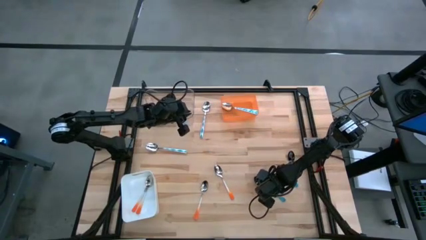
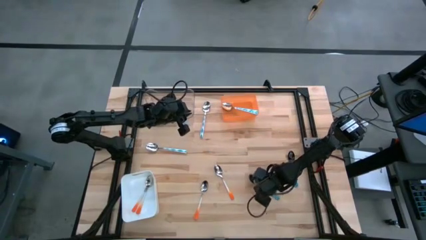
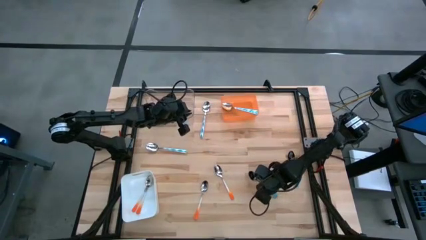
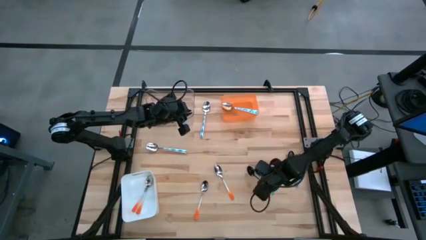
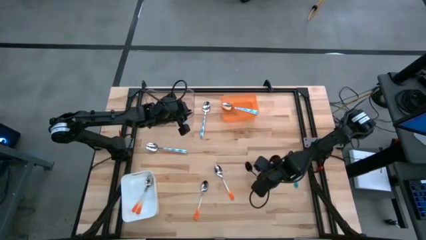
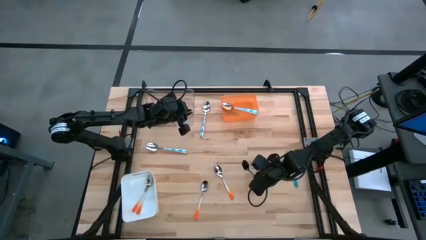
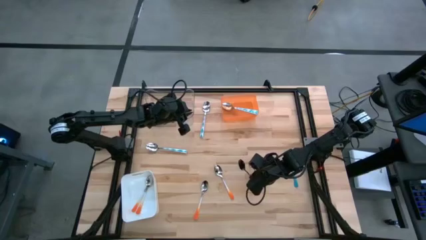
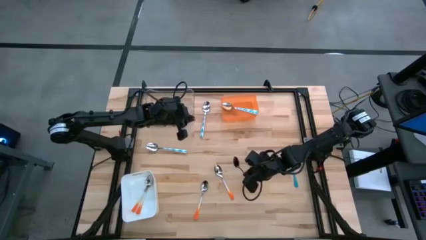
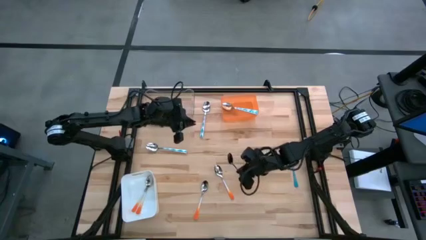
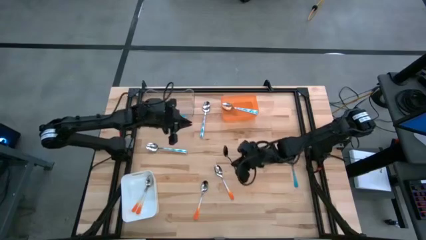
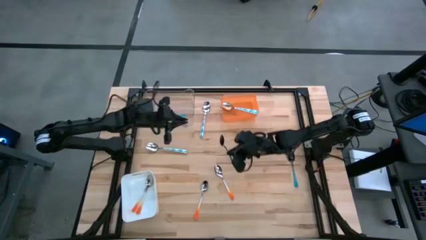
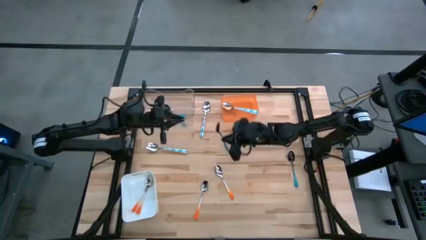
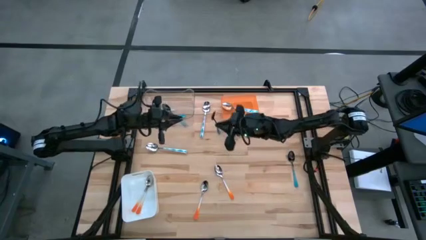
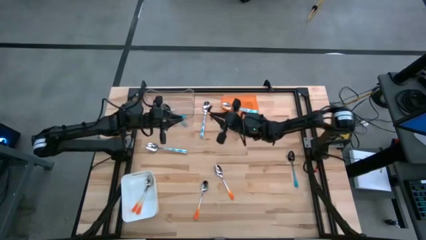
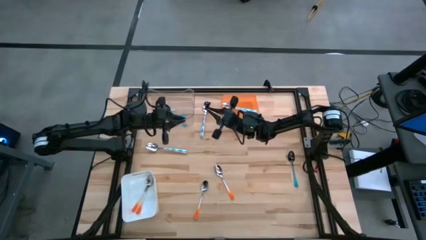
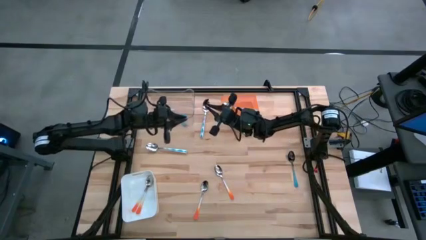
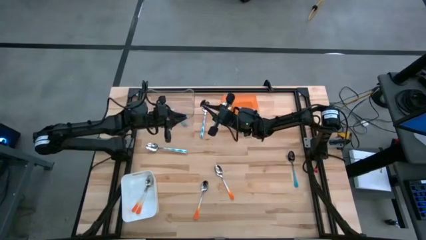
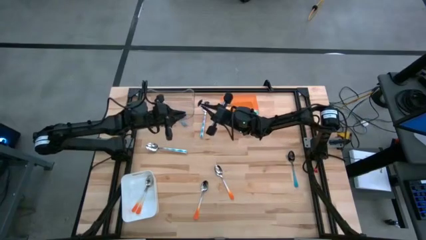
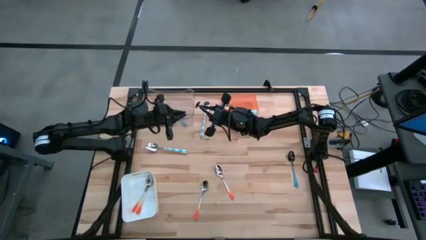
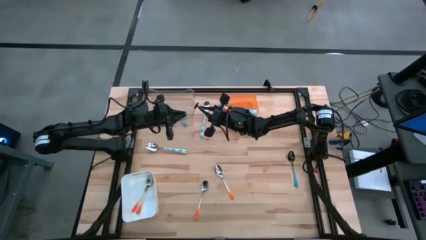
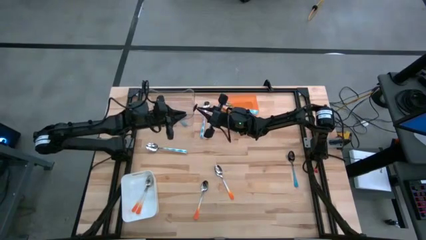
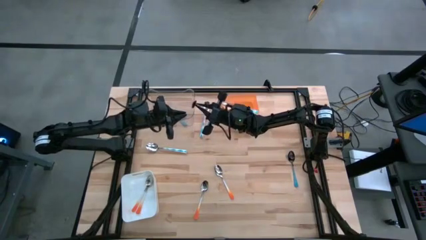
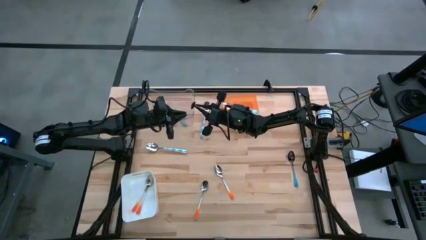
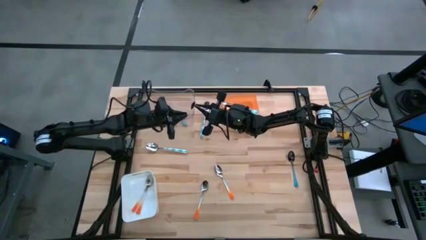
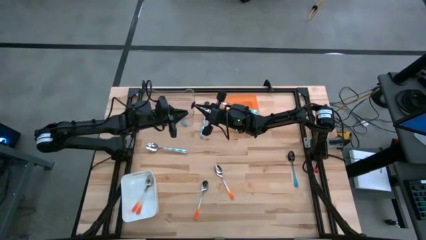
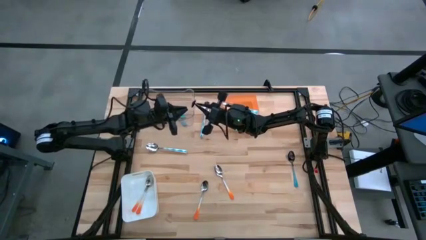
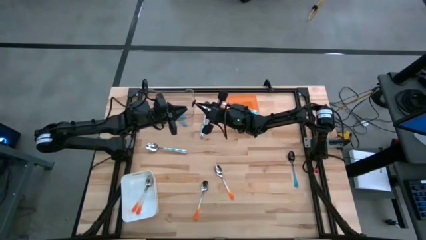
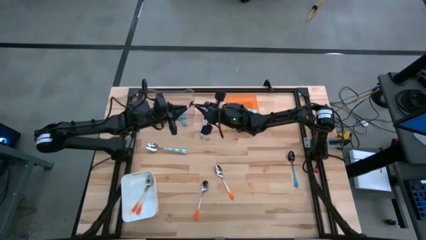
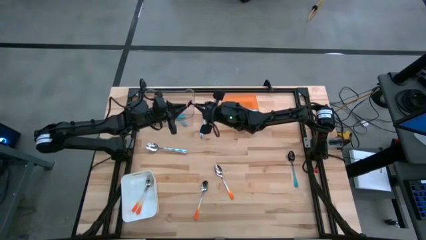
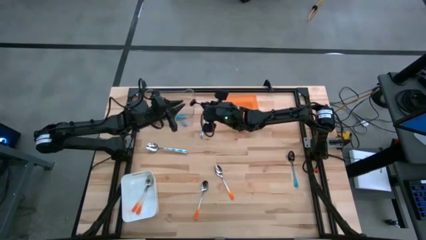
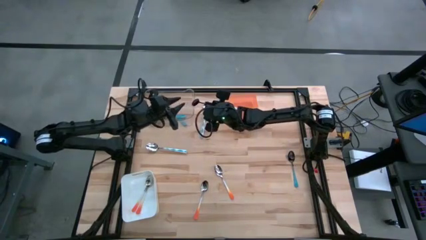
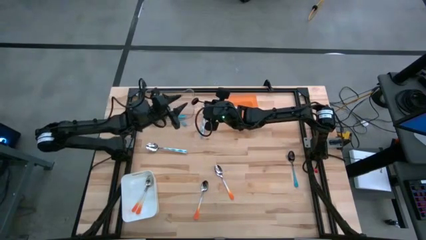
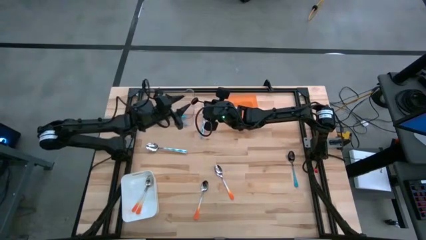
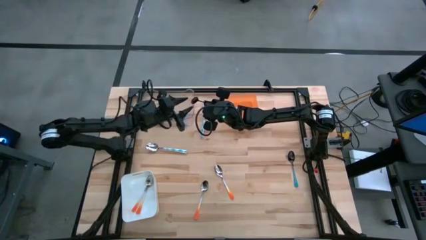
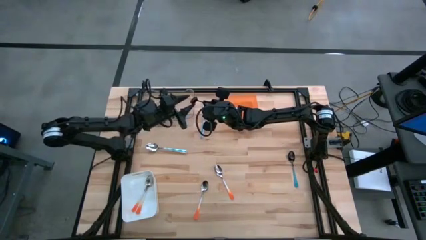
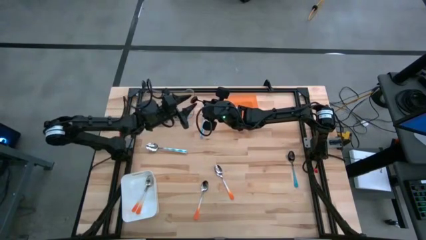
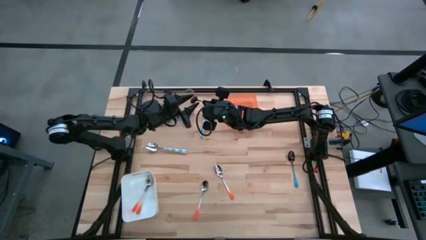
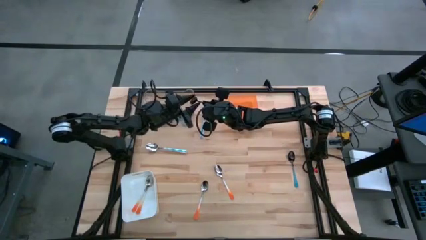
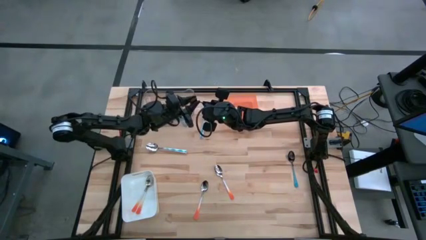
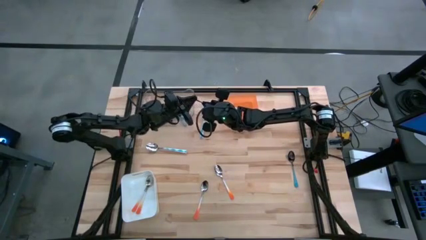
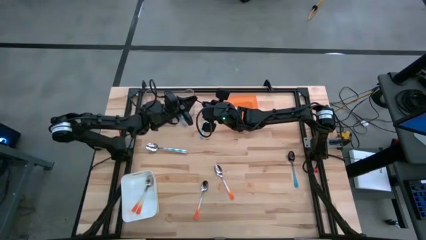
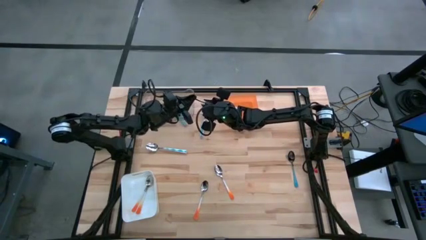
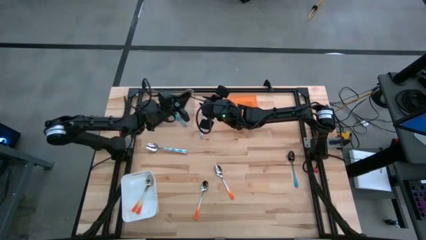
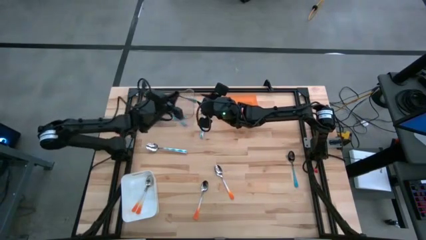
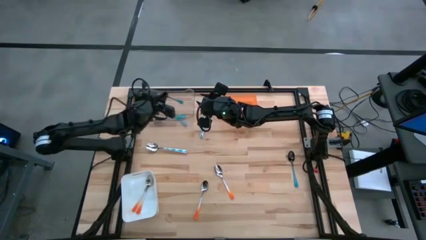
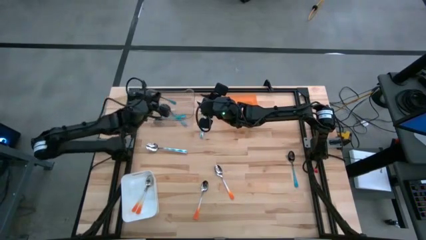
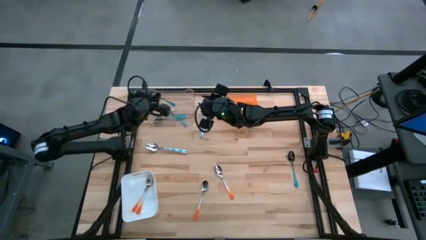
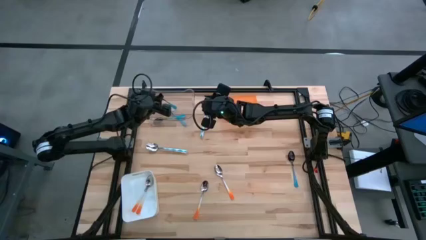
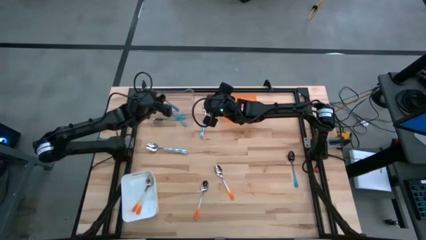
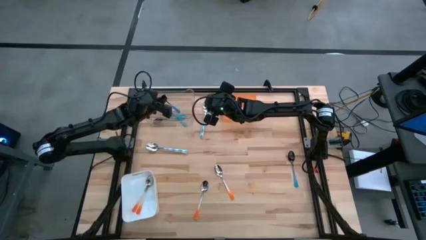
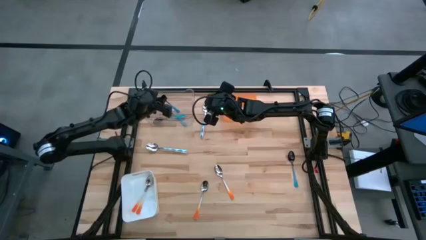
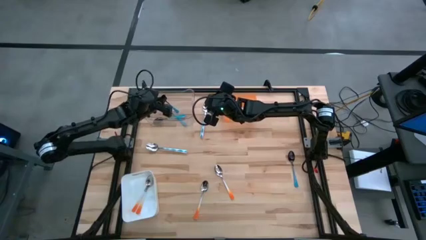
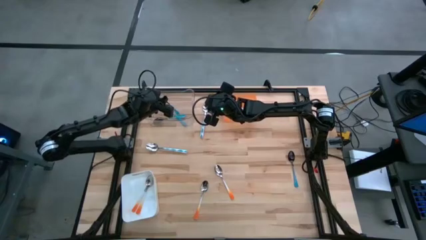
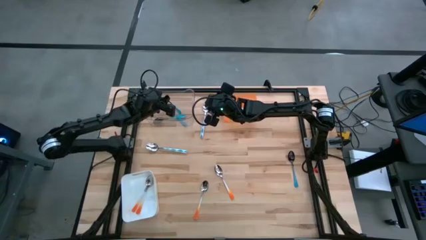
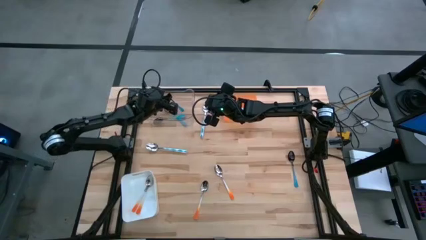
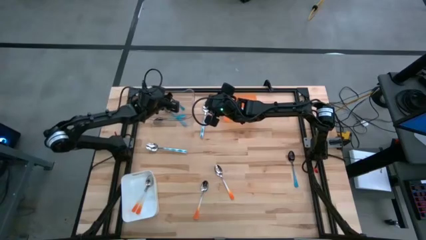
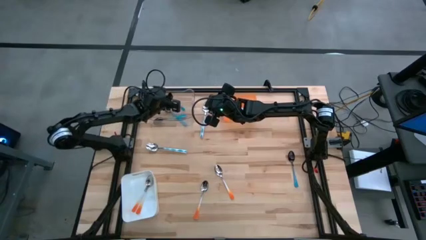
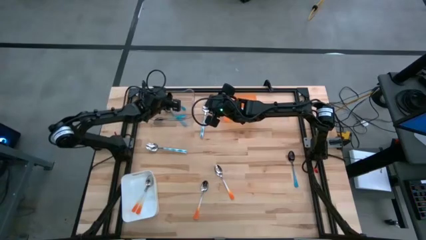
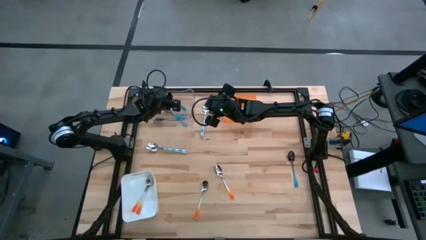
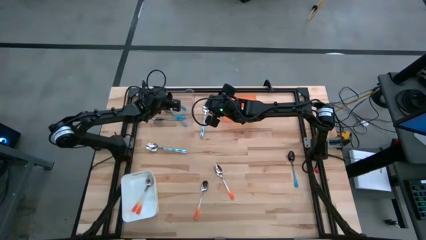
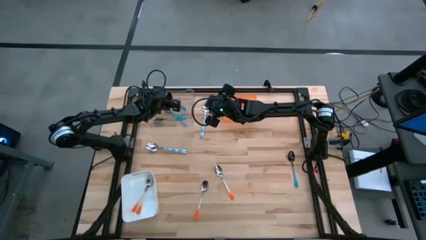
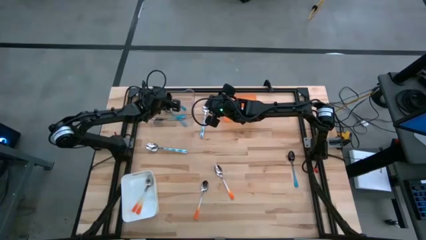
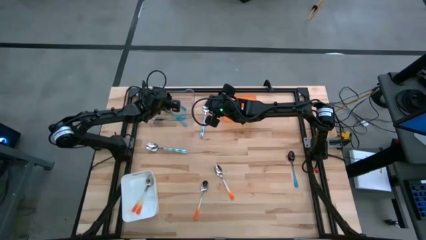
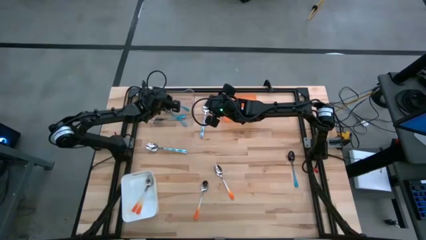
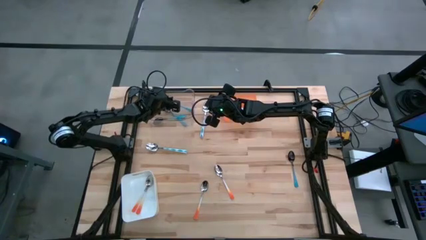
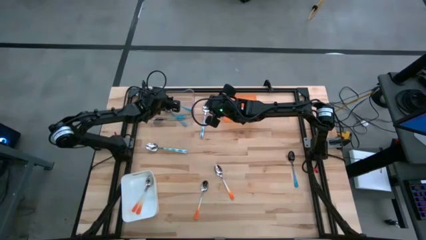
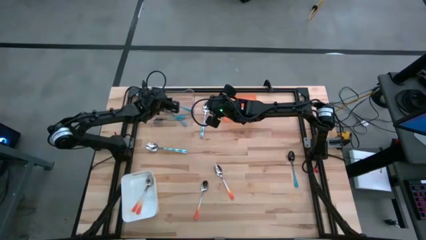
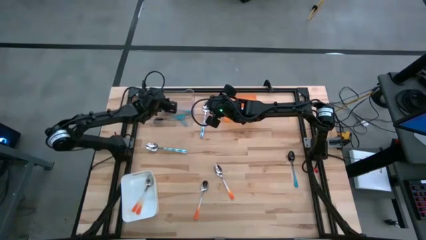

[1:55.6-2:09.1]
Task: Sort silverware by color (type)
Put the blue spoon into the transparent bin

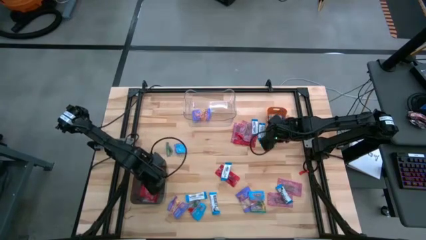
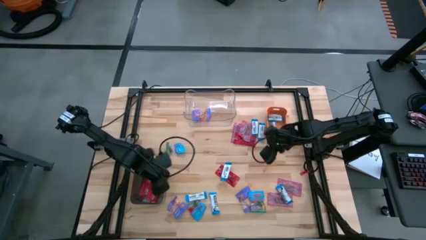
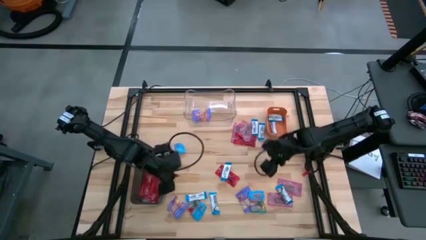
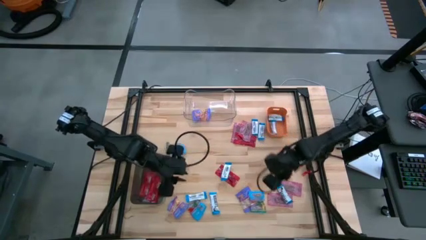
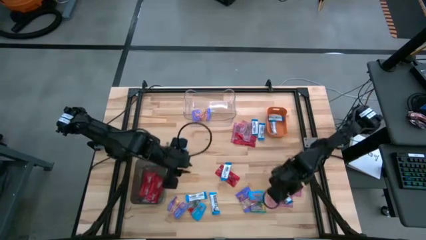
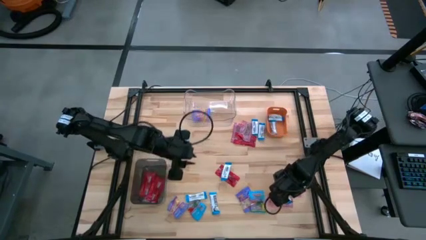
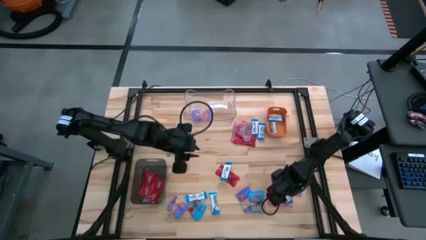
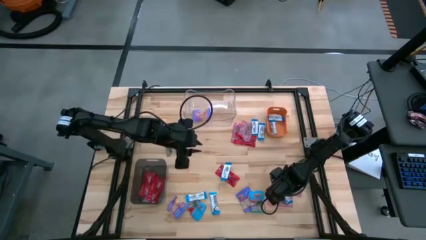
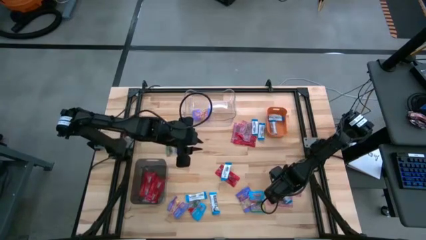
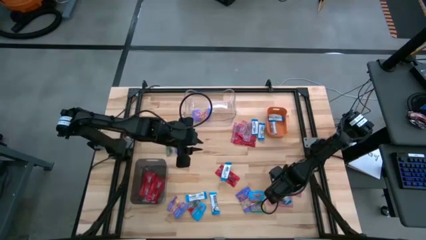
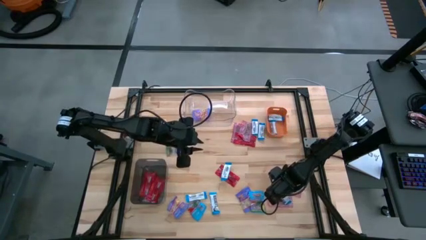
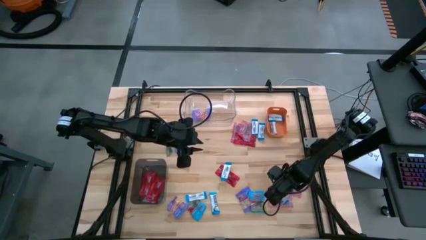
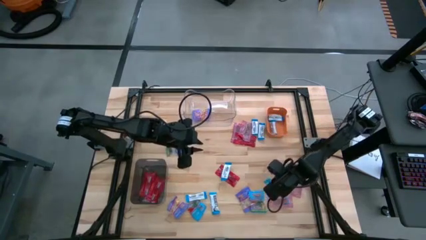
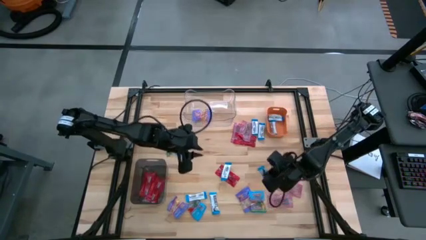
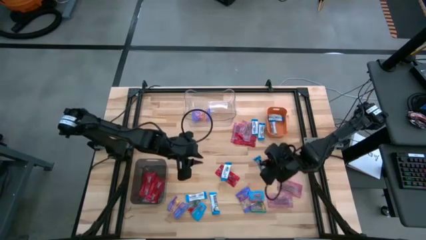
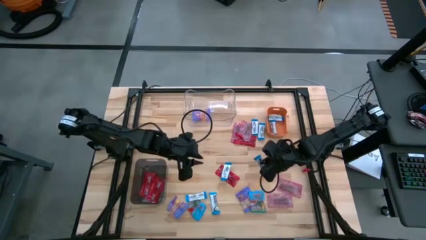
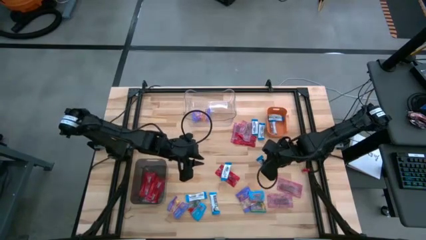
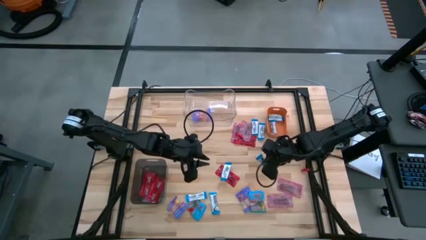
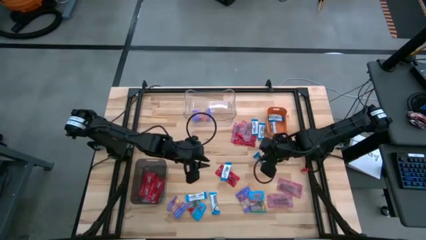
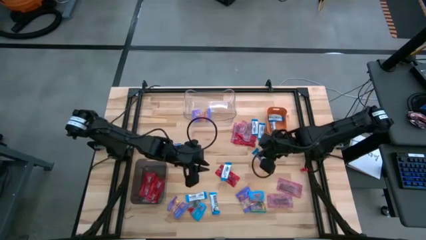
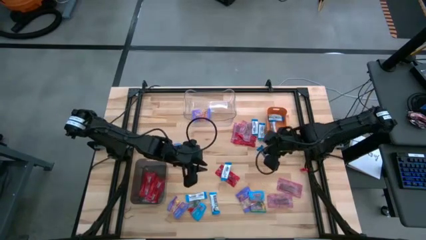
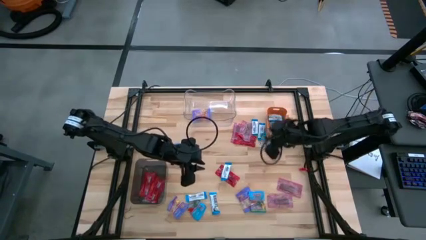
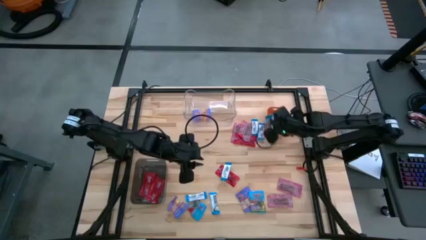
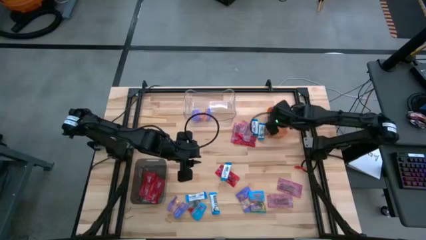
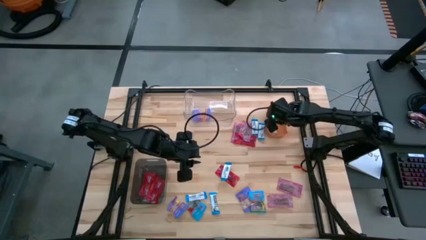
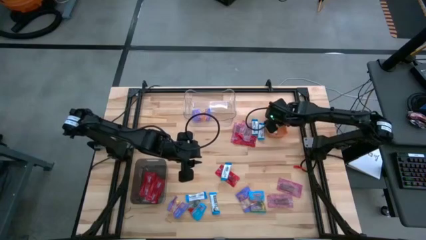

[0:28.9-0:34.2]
Task: Sort candy
Put the white chocolate into the orange bin
